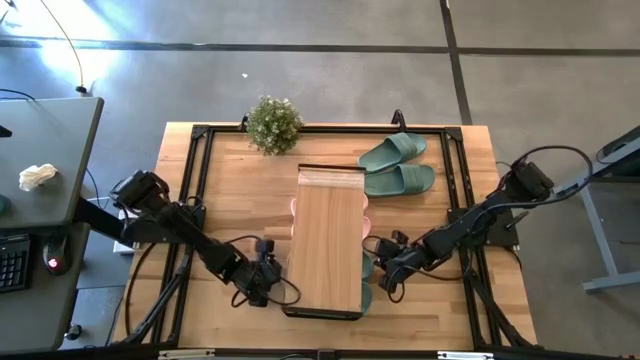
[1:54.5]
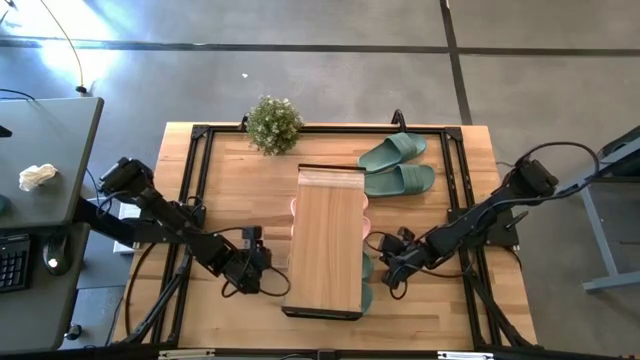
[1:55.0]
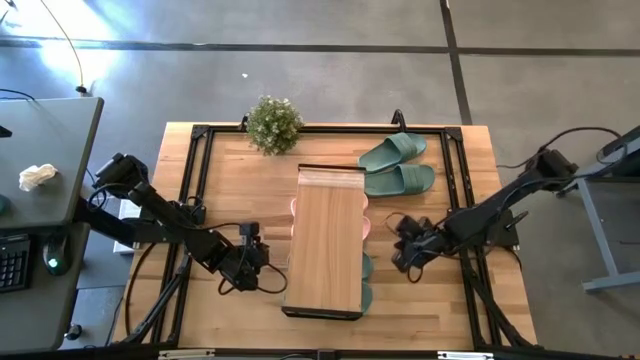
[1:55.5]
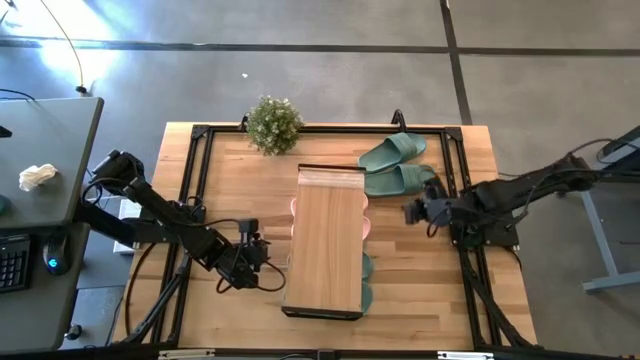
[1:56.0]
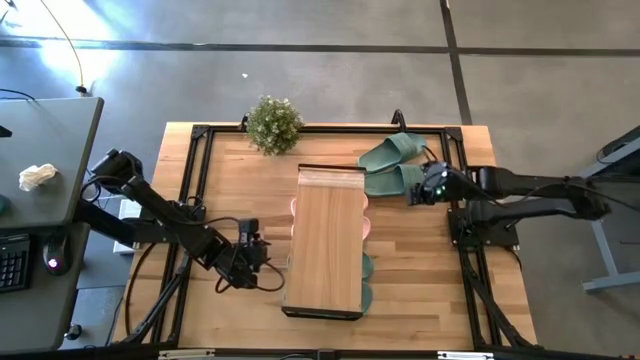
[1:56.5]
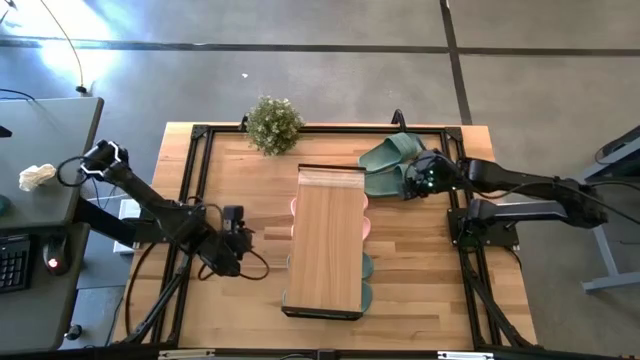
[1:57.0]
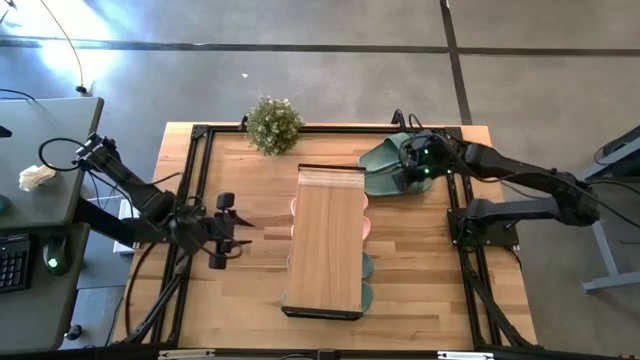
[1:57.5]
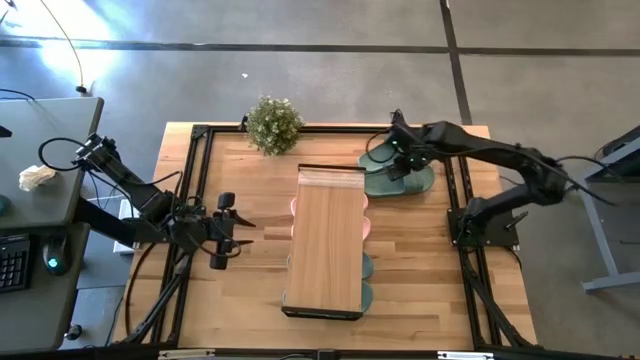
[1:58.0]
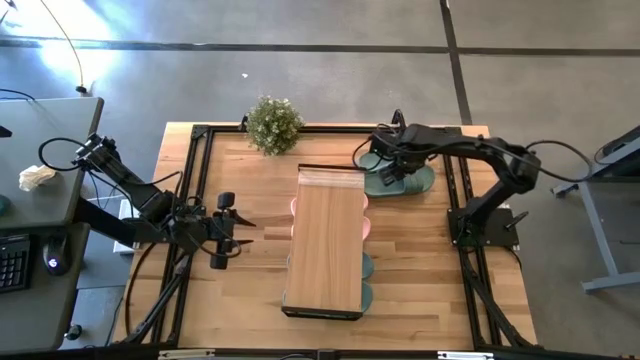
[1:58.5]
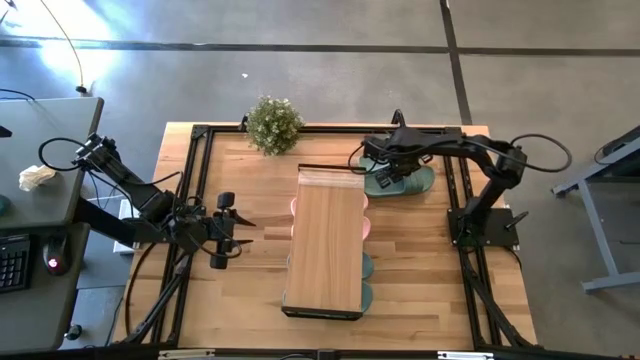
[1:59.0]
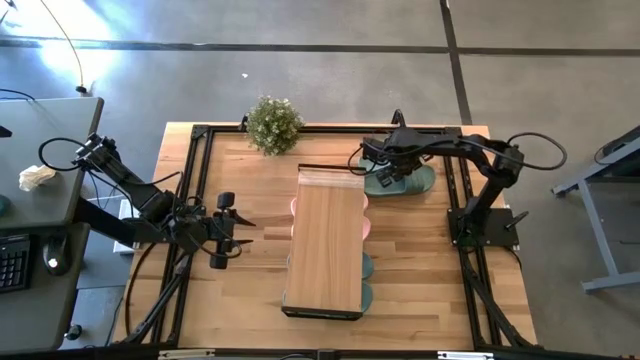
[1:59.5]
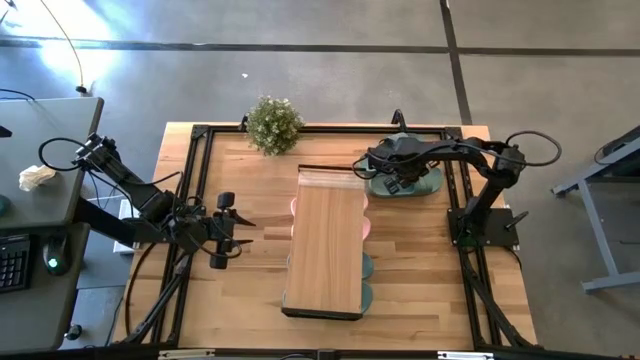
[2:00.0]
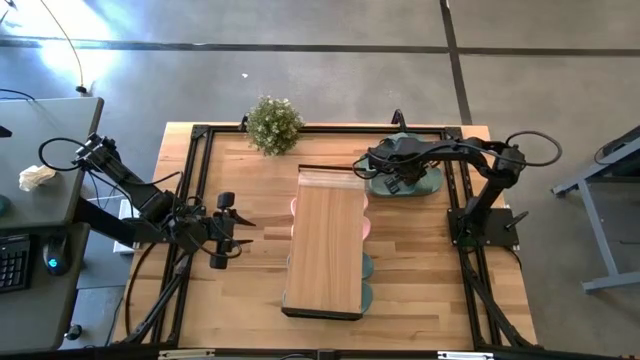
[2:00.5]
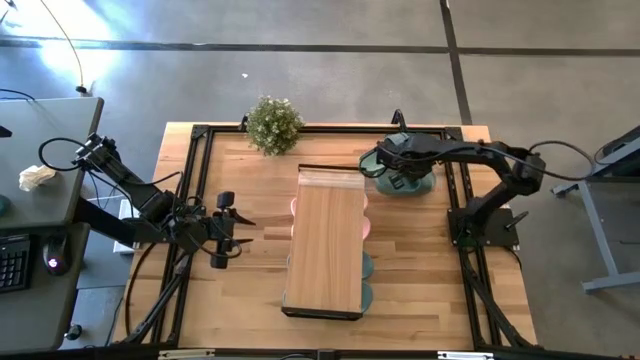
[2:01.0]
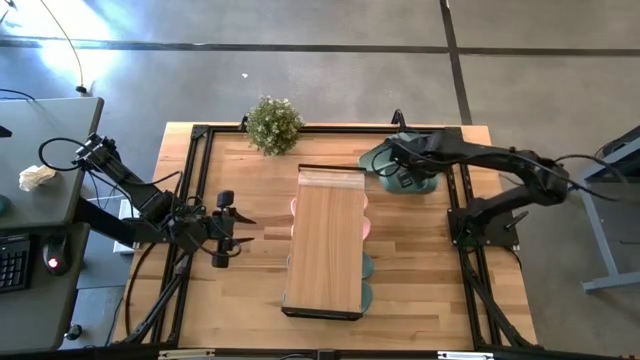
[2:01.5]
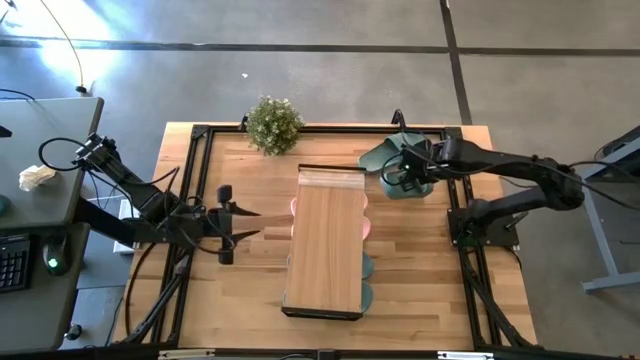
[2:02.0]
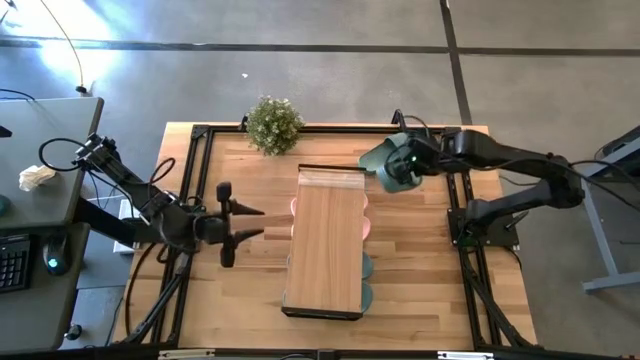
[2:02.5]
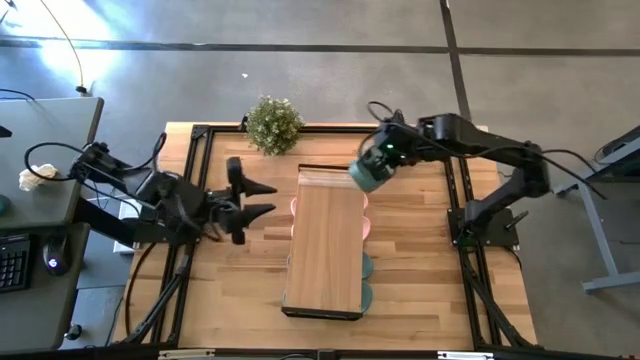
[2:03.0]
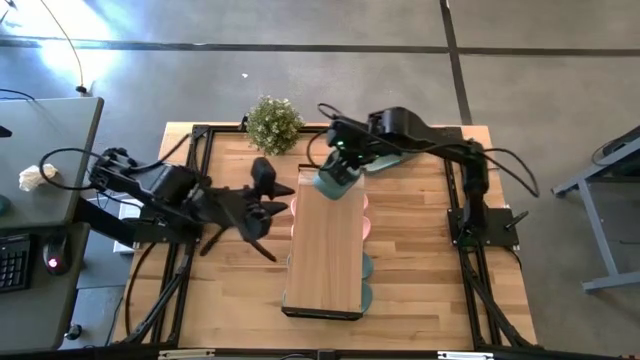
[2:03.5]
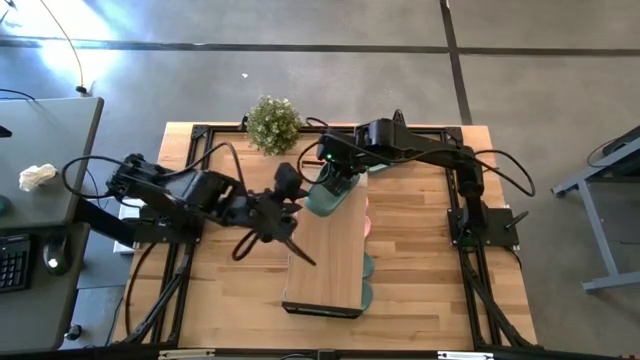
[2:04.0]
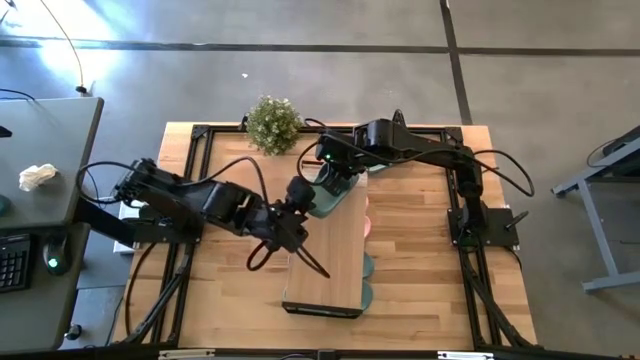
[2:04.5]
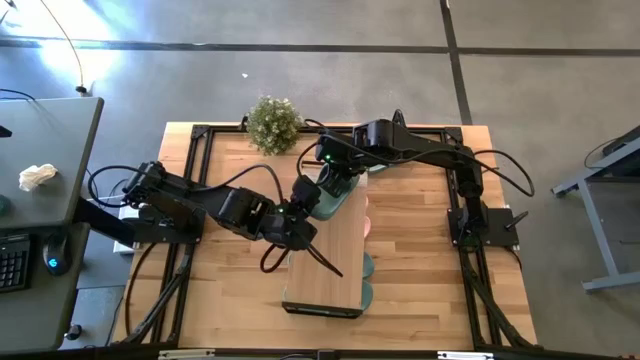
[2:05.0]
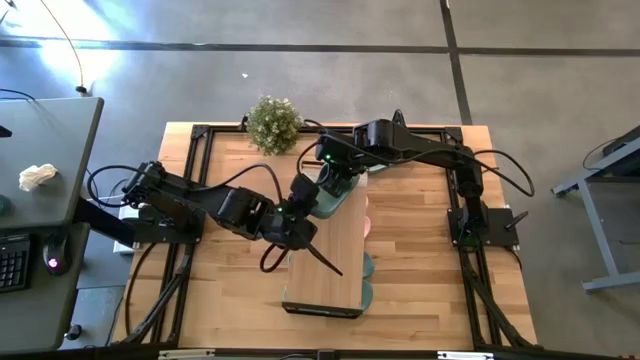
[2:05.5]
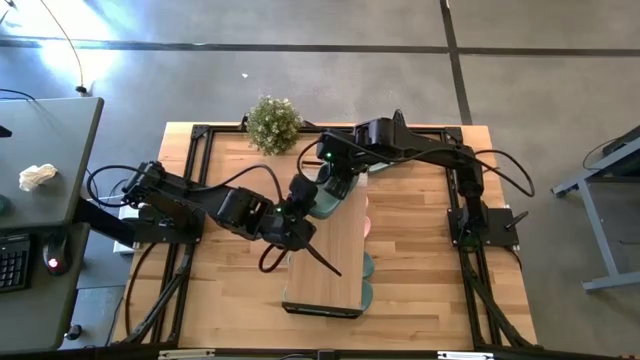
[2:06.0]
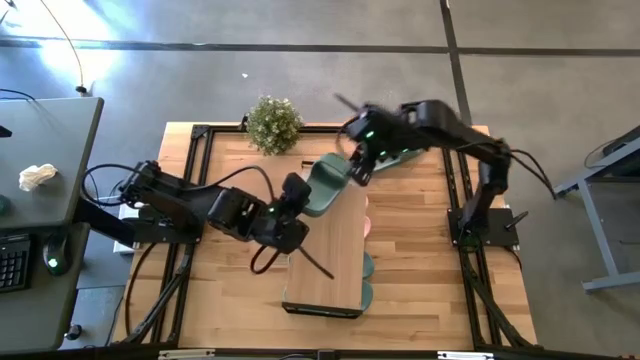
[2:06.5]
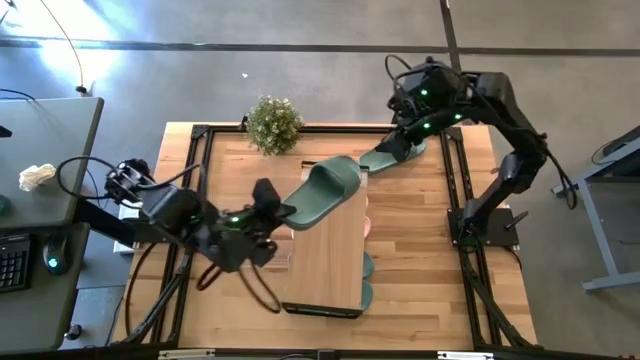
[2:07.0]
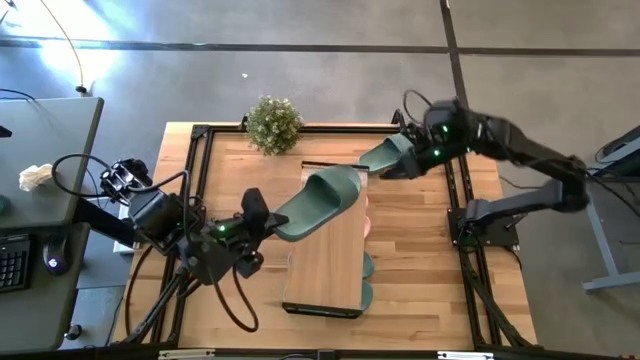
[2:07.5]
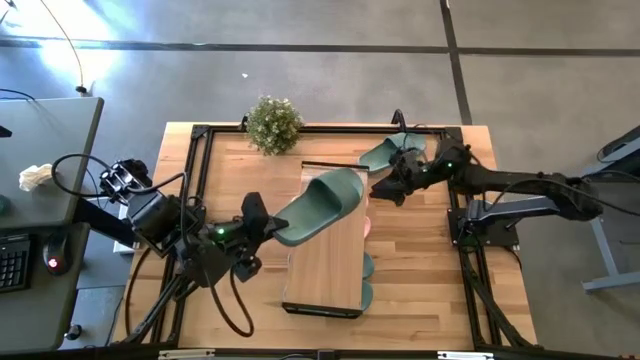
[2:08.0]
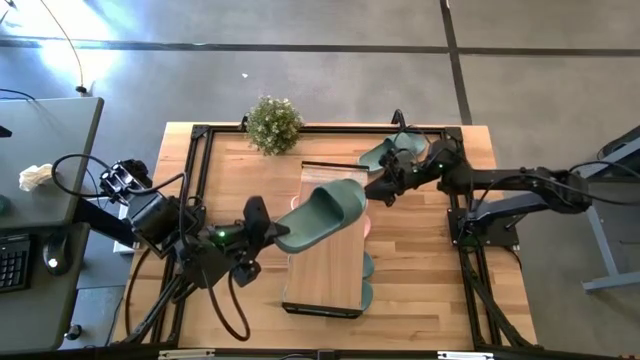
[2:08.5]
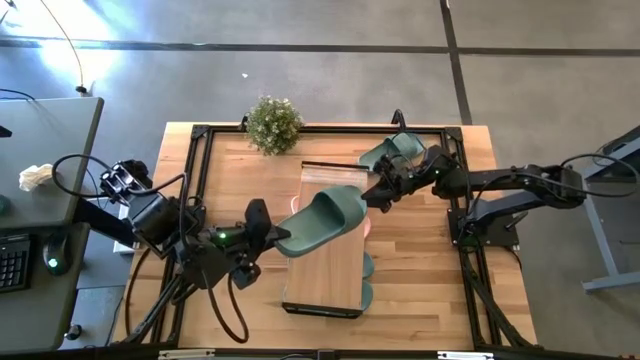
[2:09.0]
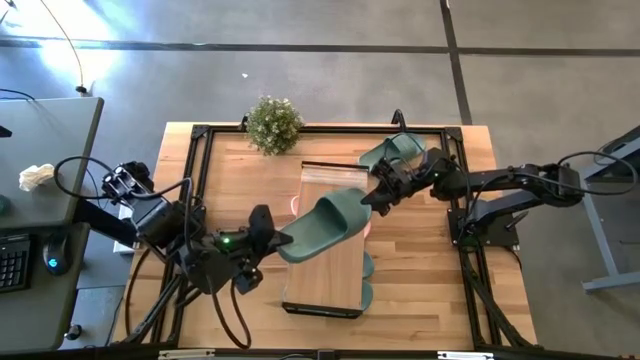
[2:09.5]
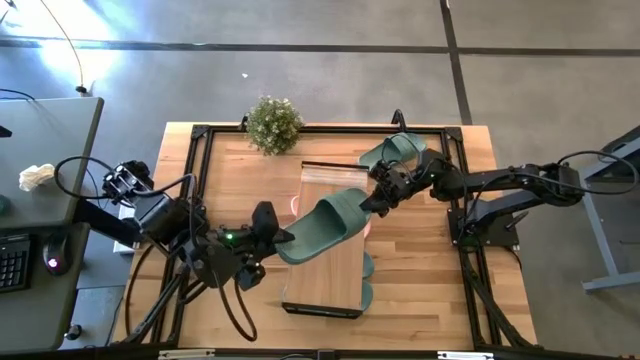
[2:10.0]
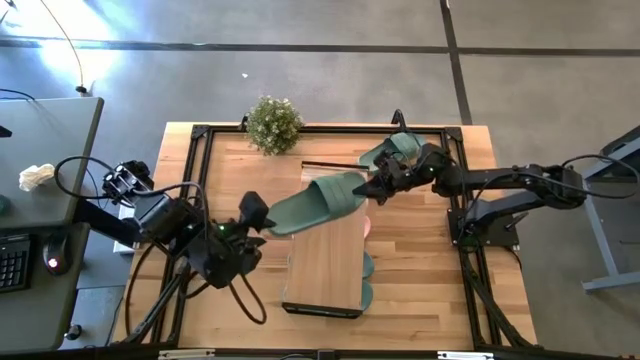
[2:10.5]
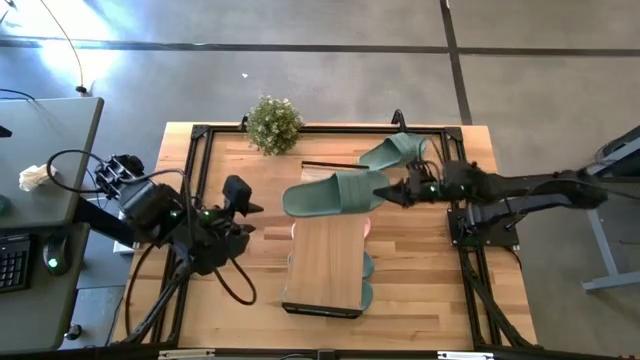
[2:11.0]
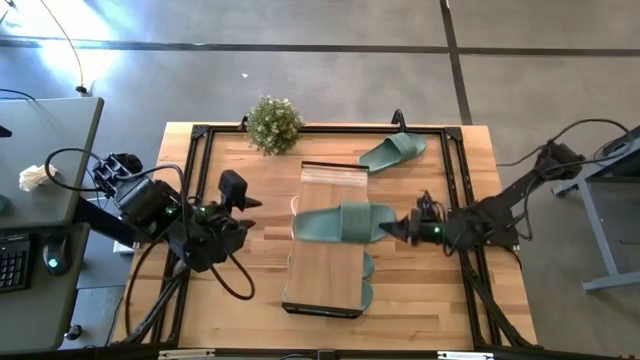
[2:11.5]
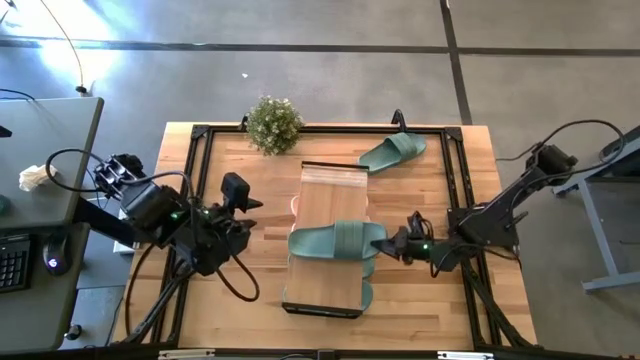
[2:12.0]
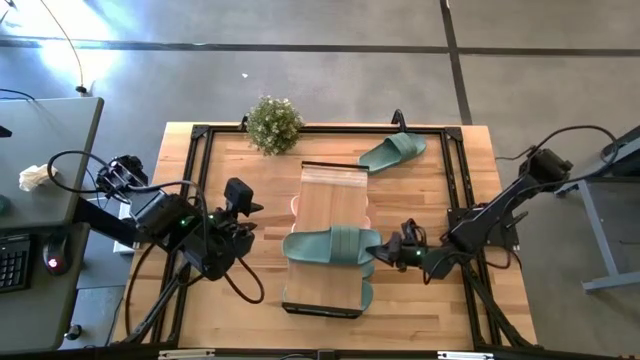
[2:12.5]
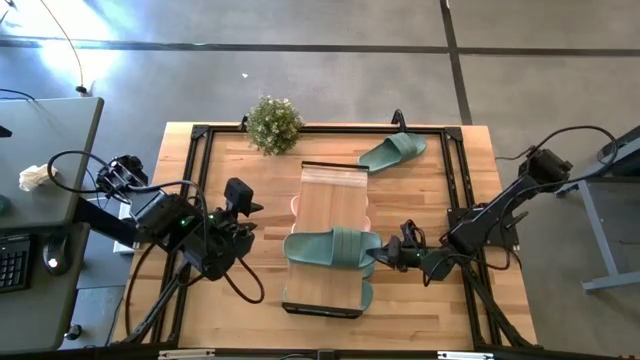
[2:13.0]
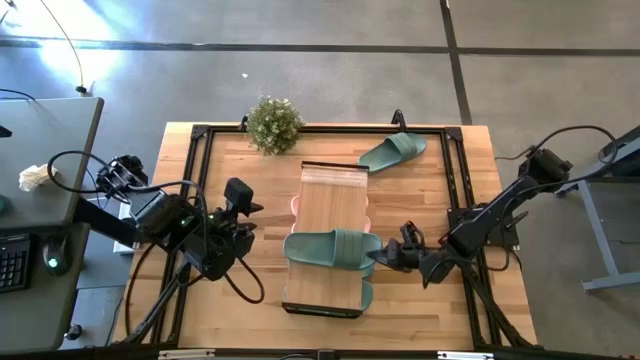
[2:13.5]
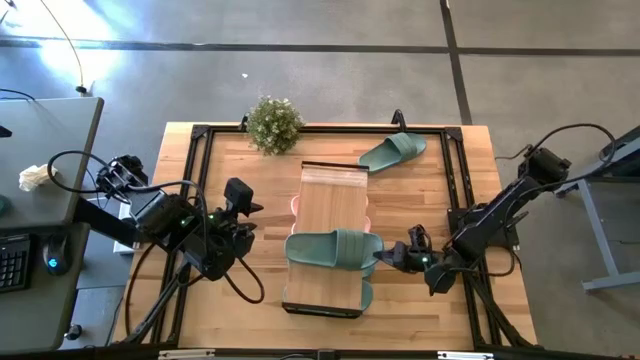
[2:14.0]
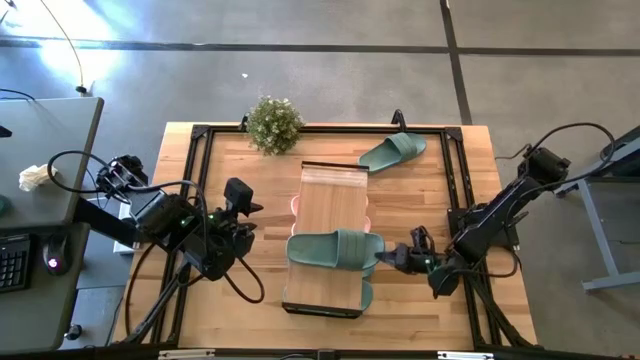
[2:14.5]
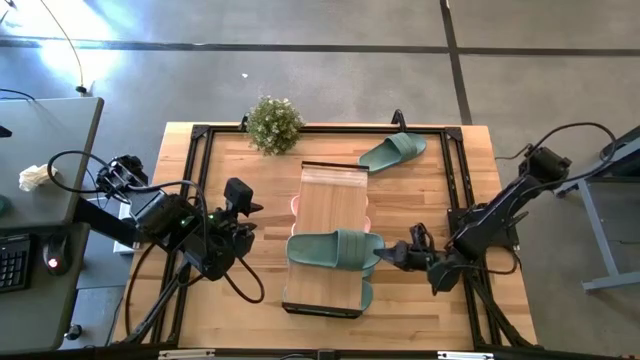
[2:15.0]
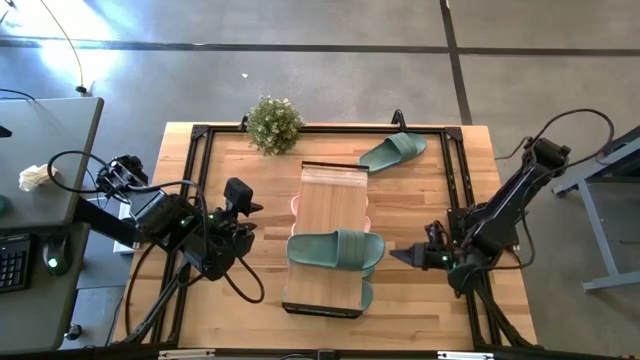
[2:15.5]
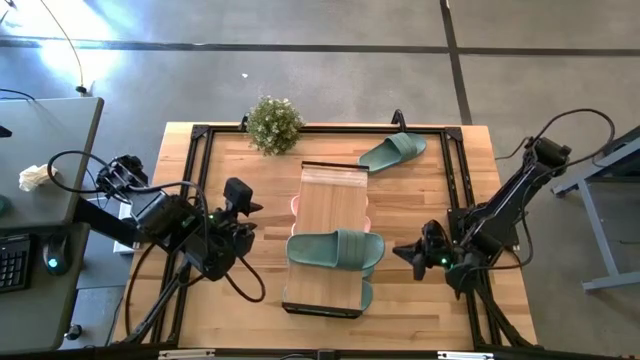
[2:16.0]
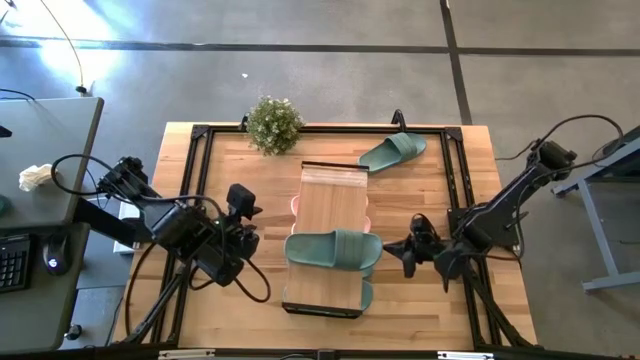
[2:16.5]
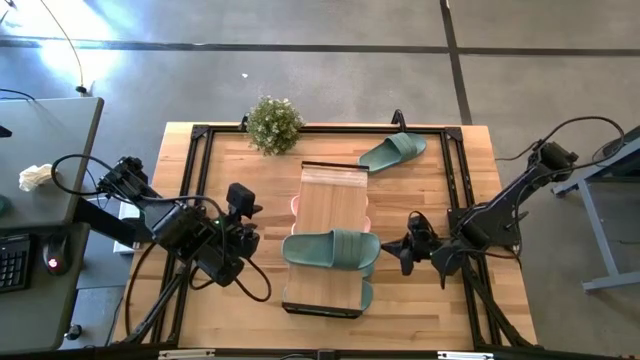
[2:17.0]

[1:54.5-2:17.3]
Task: Pick and place slides into the shelf
Put the bottom green slide on the shelf
